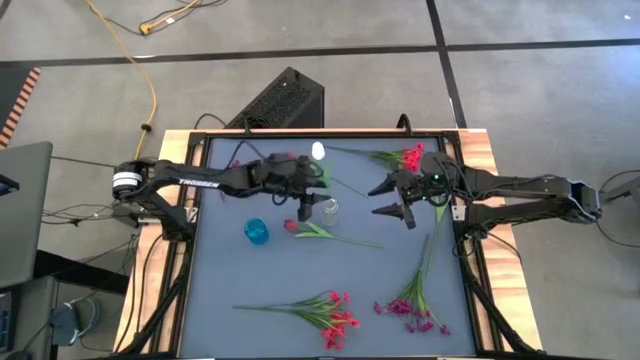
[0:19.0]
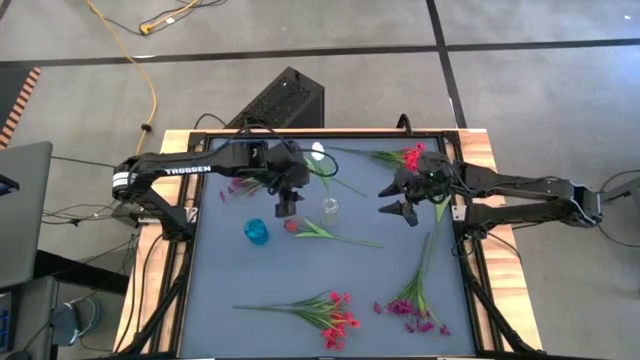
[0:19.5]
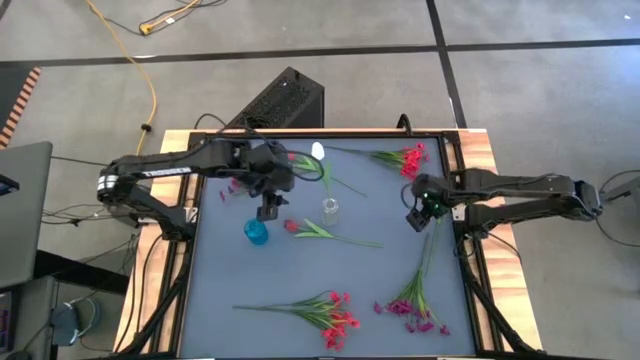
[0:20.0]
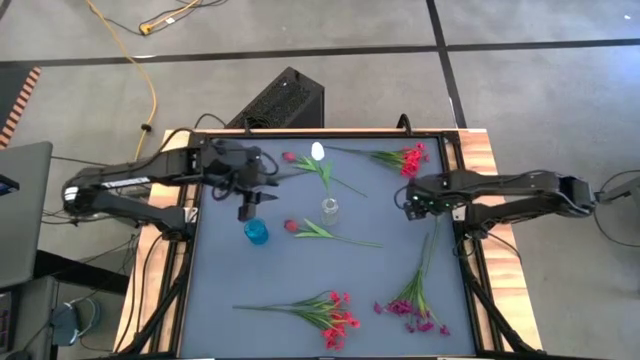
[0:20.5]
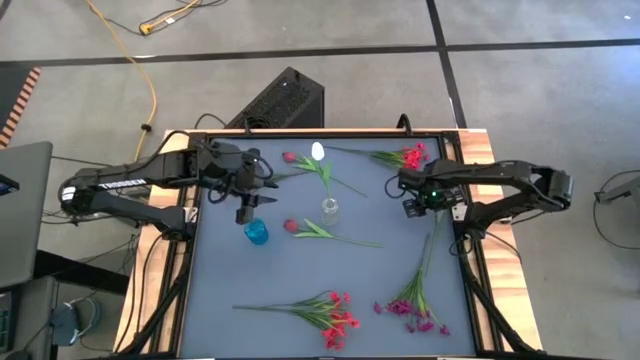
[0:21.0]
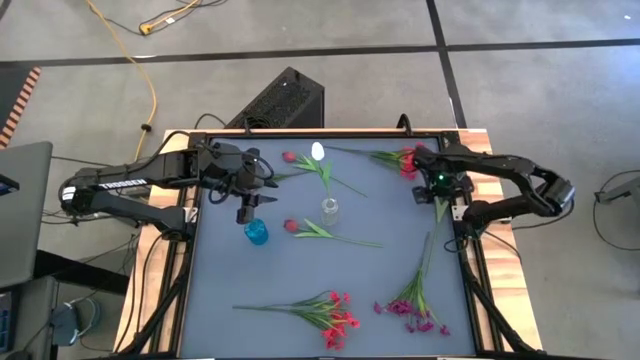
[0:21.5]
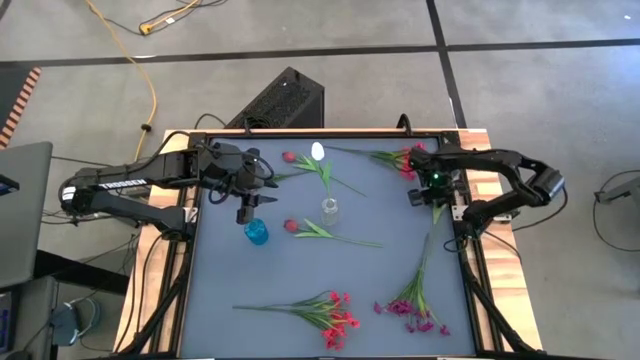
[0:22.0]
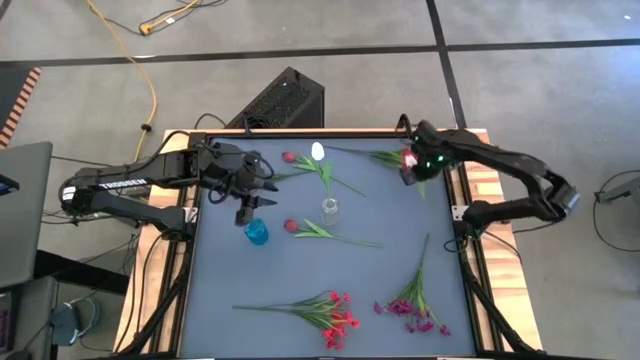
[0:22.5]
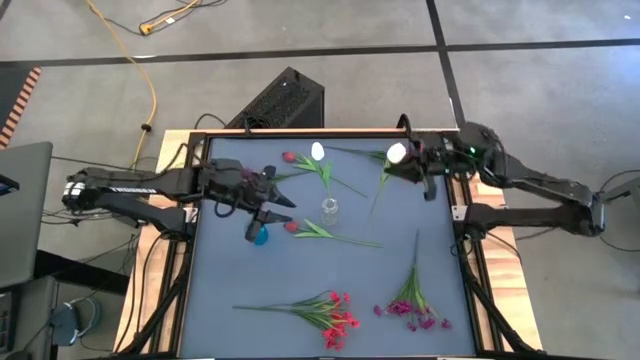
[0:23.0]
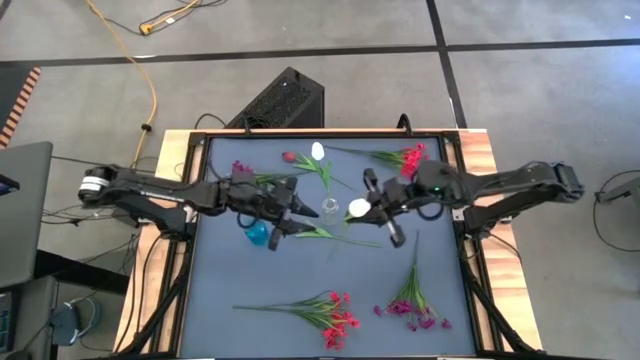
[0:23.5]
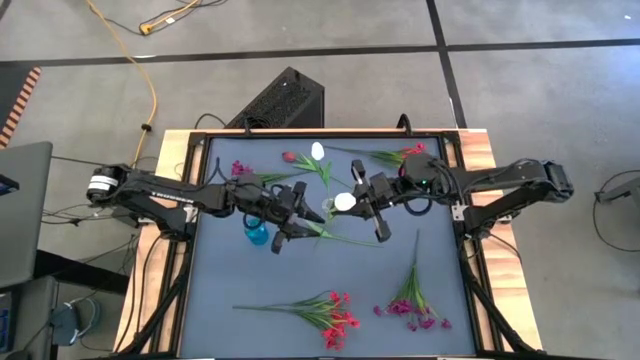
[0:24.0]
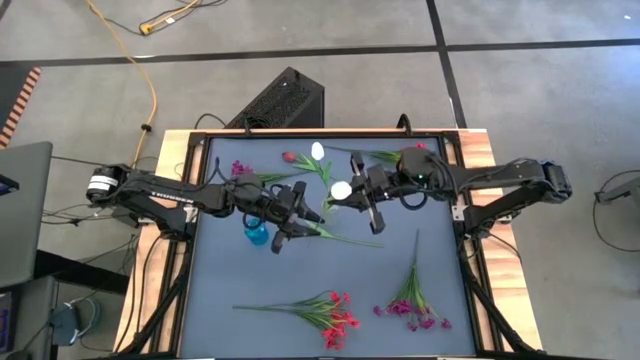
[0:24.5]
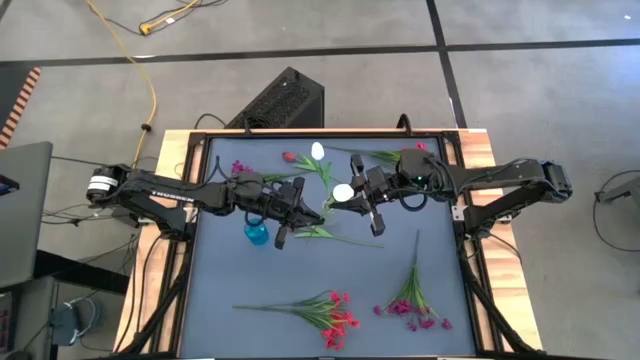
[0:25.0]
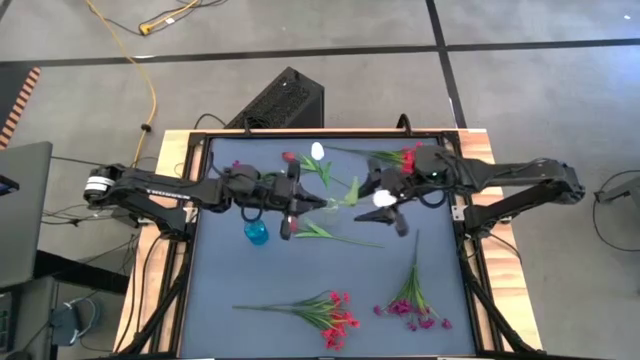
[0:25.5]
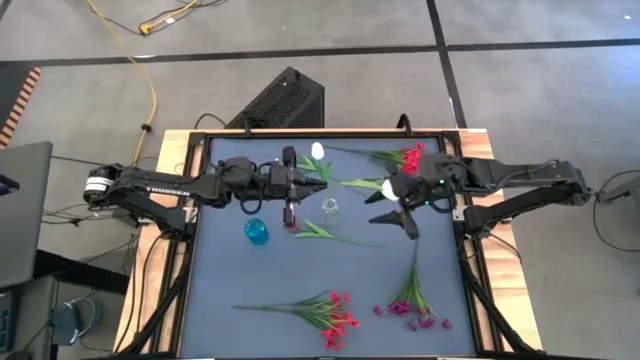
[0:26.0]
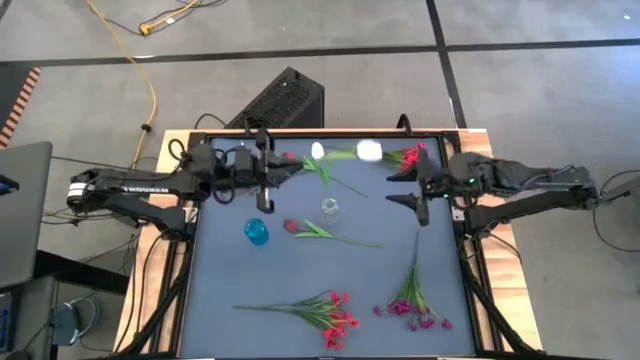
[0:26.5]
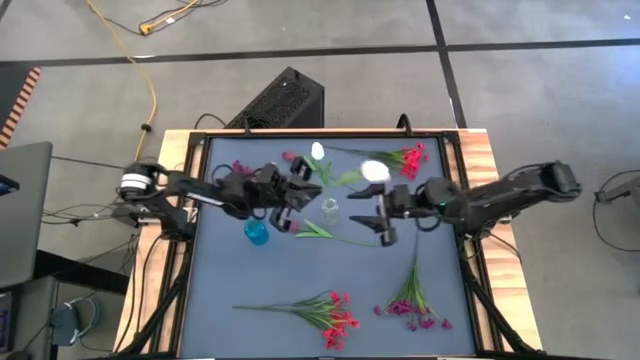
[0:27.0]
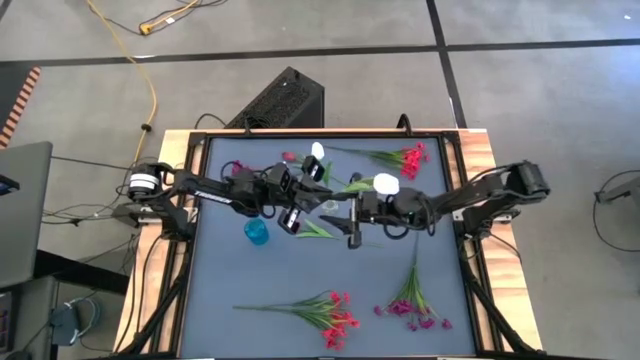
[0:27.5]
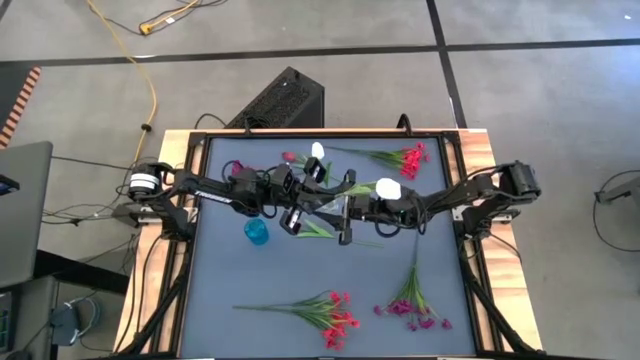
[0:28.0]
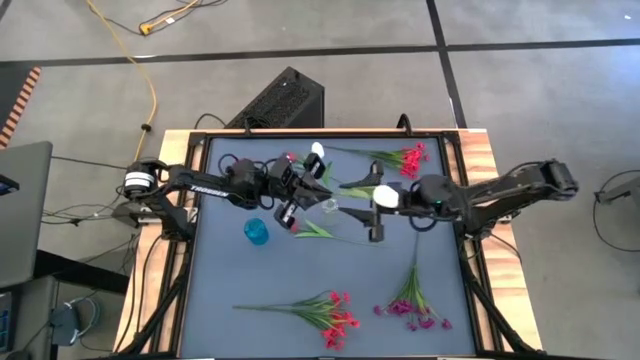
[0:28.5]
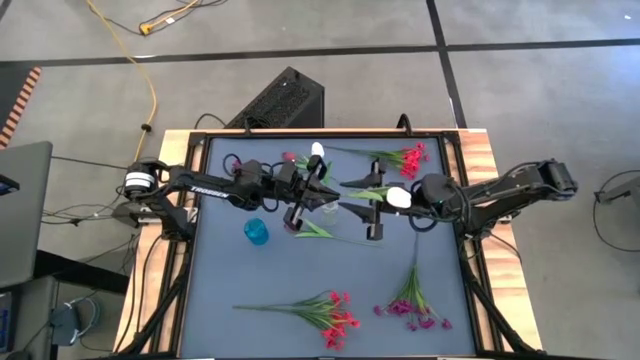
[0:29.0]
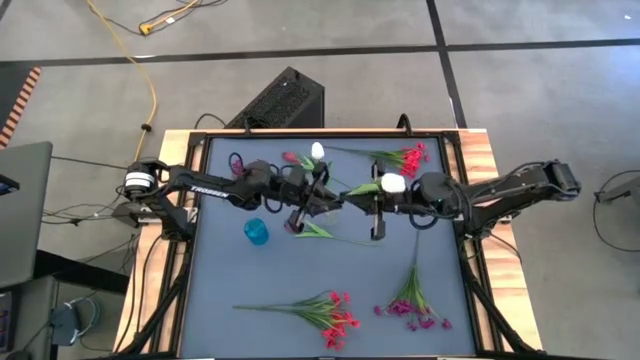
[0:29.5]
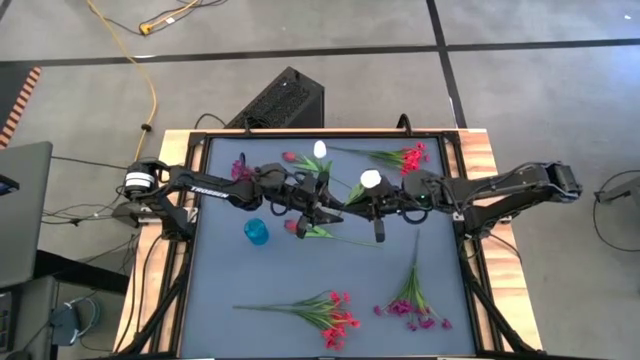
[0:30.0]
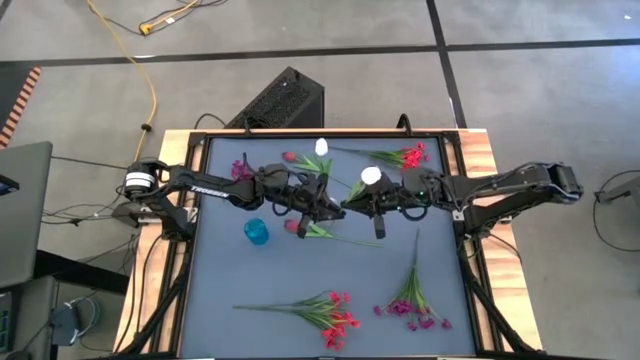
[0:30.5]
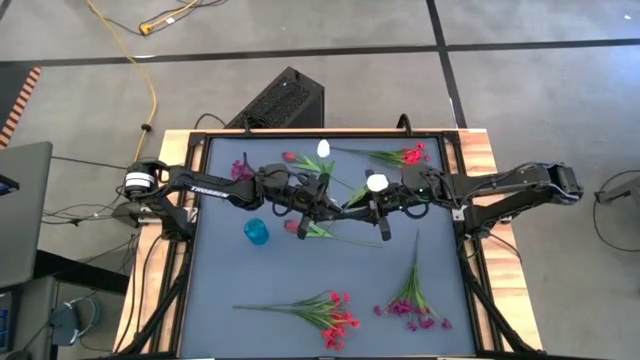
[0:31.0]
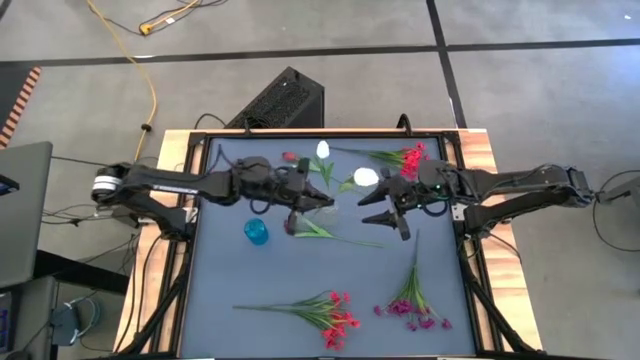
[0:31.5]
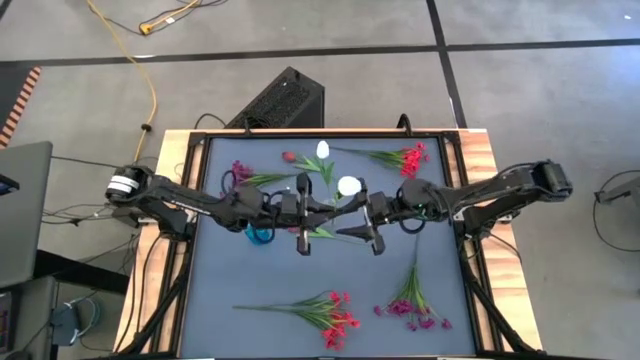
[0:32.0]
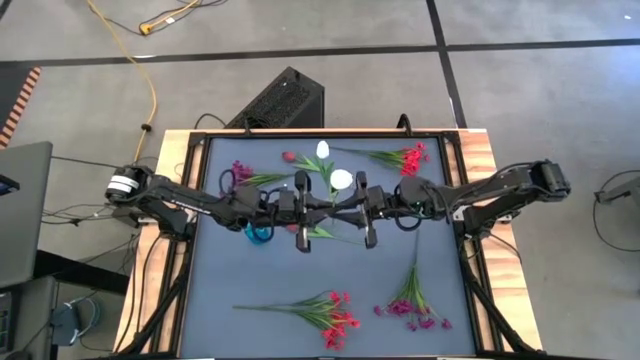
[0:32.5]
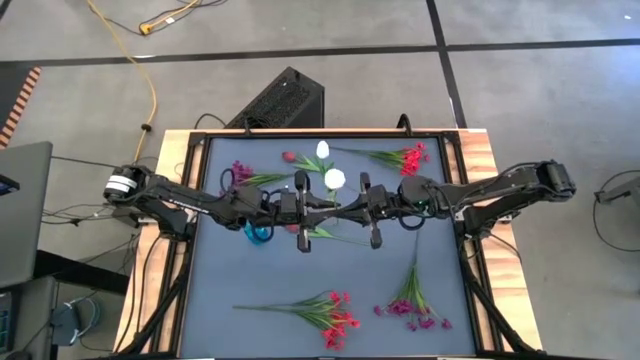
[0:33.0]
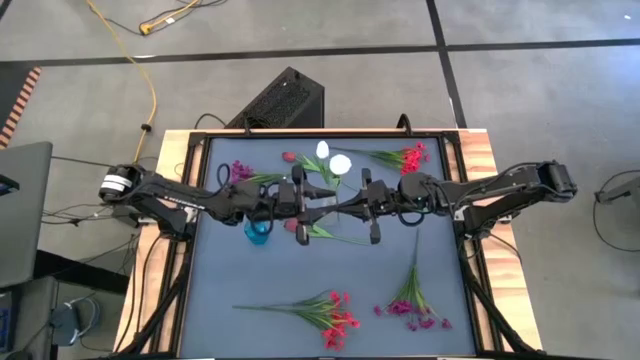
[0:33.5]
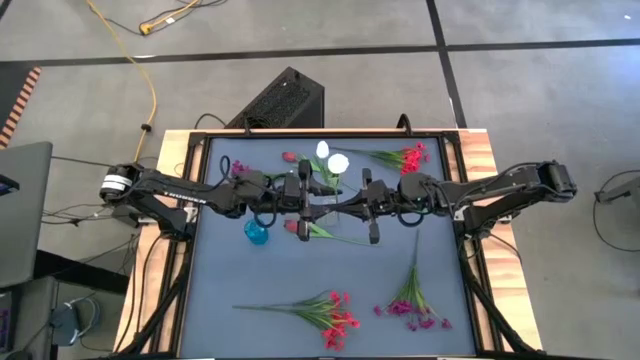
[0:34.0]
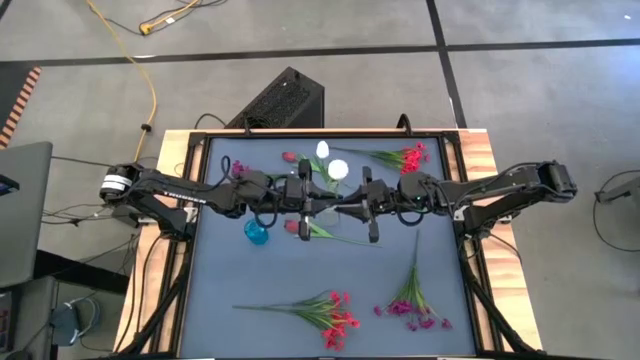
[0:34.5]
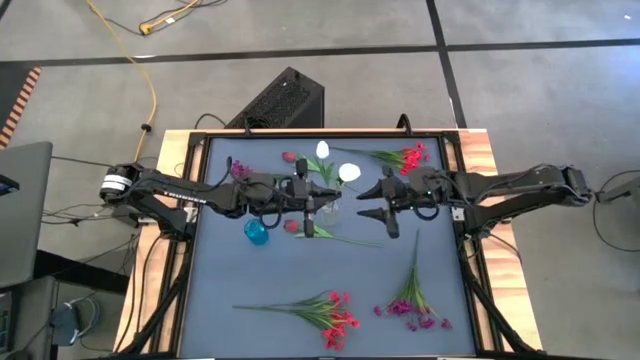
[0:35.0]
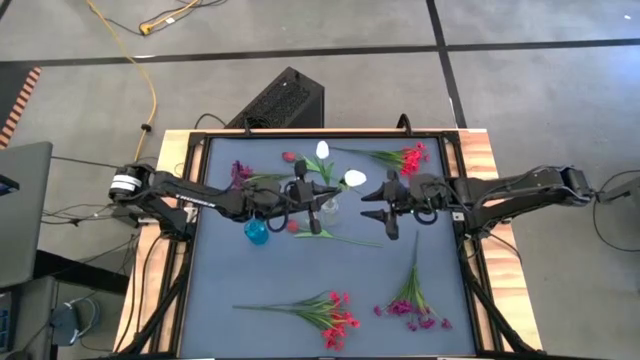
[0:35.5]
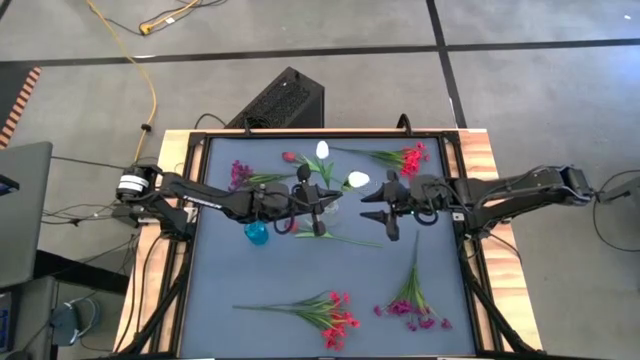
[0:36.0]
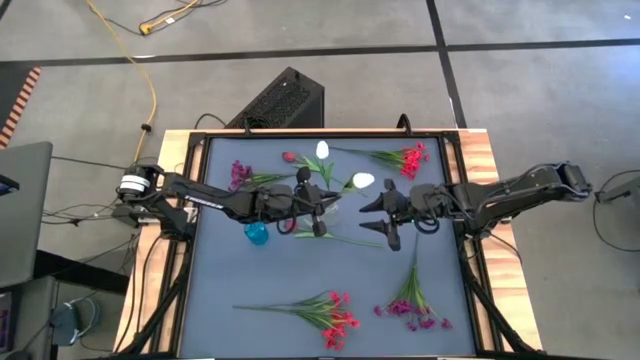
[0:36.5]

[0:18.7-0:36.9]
Task: Sort flowers into vase by color
Put the white tulip into the transparent vase

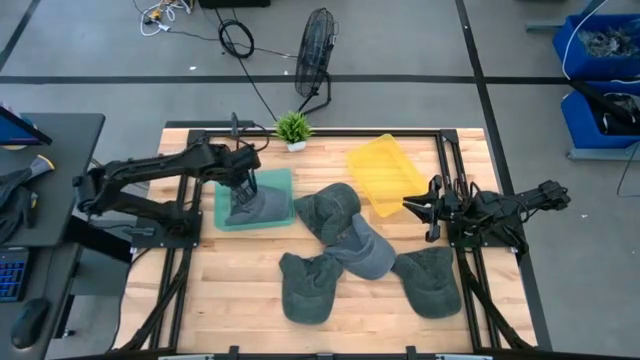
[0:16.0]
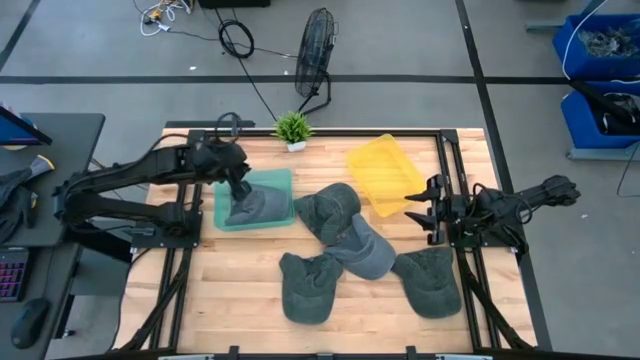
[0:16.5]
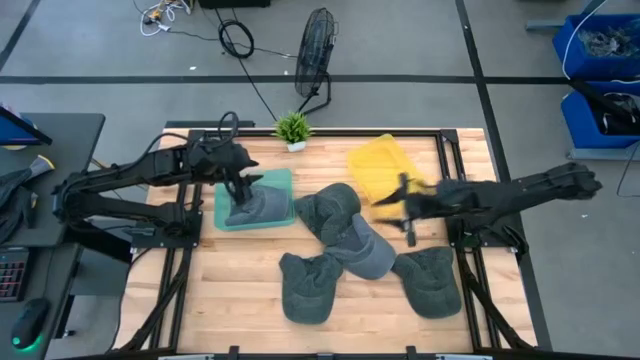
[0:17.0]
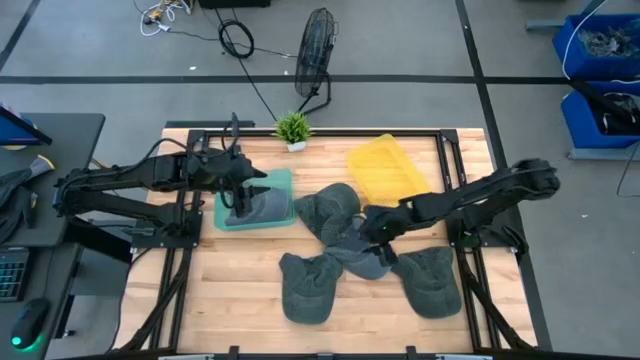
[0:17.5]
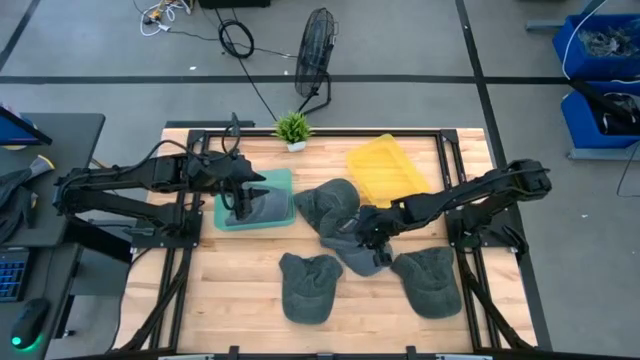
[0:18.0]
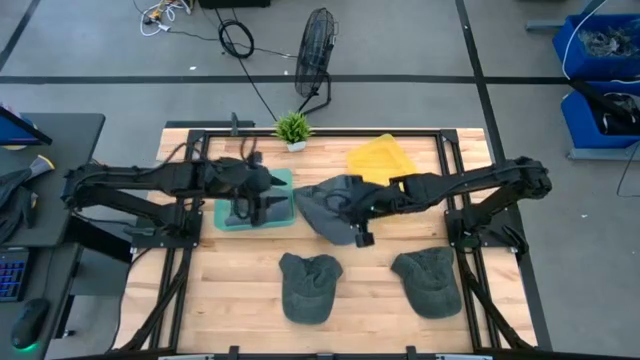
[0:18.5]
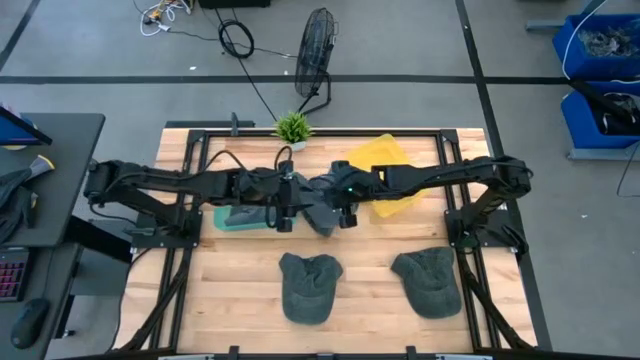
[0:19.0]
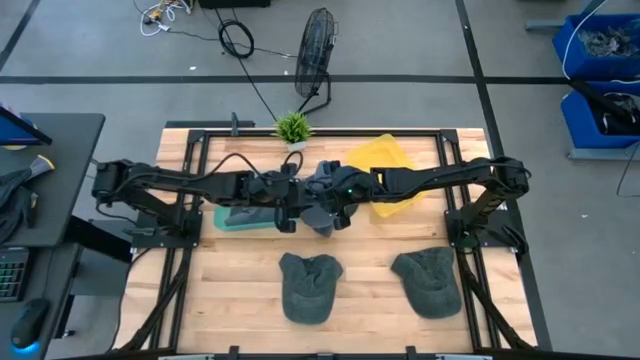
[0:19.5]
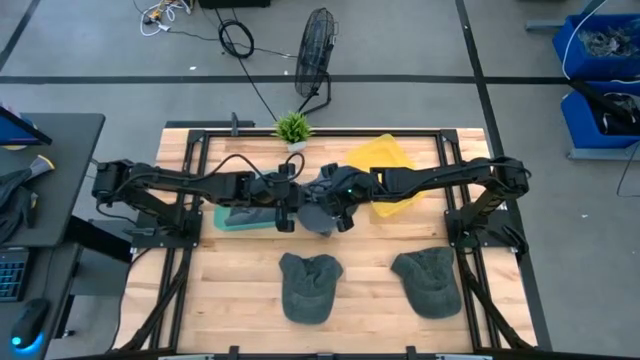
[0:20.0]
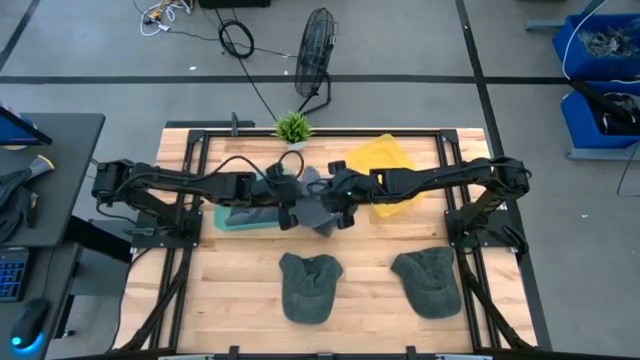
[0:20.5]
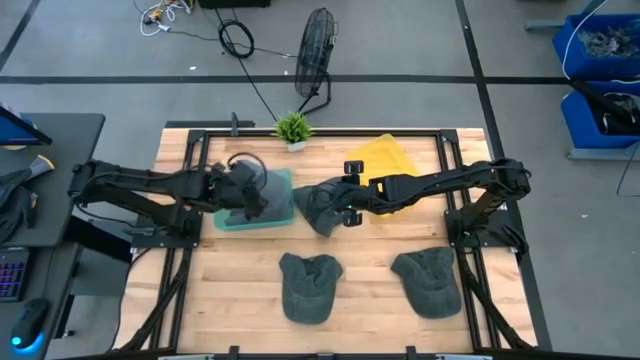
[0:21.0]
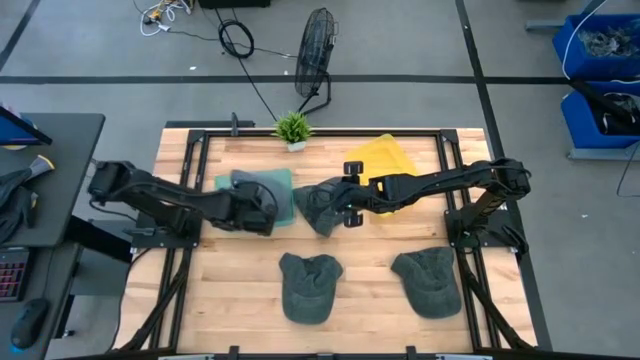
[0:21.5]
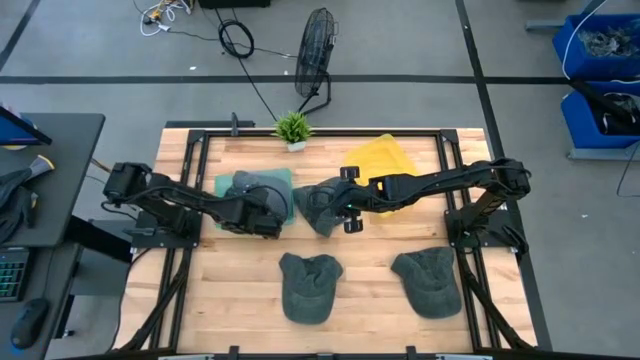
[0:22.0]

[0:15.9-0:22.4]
Task: Pick & Place hat
Put the gray cap into the green bin
